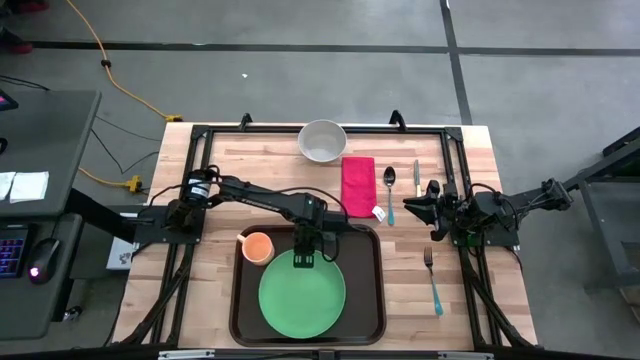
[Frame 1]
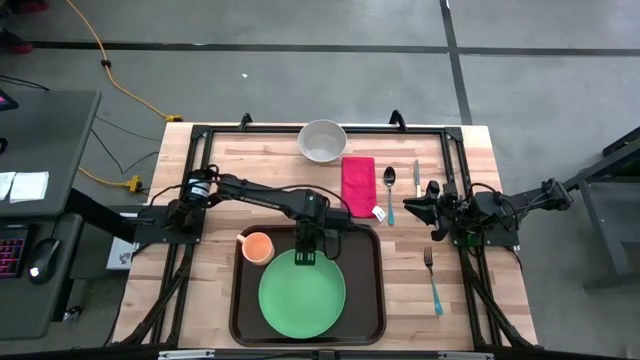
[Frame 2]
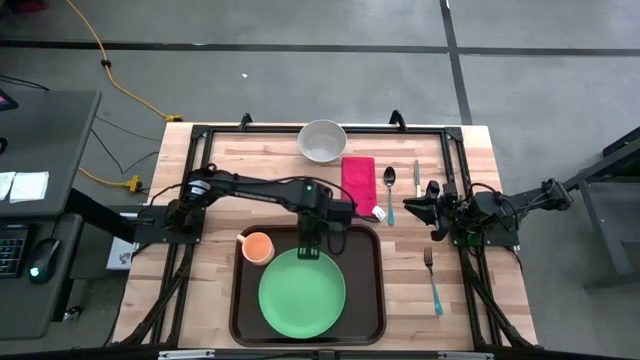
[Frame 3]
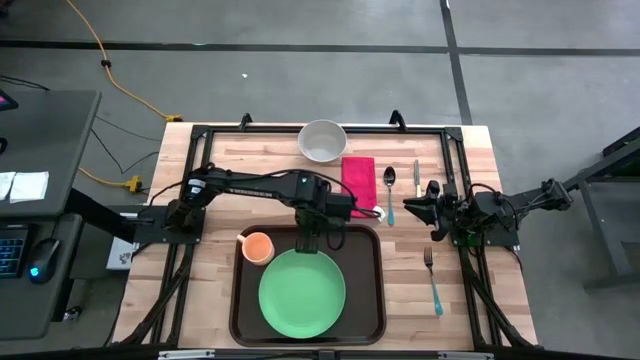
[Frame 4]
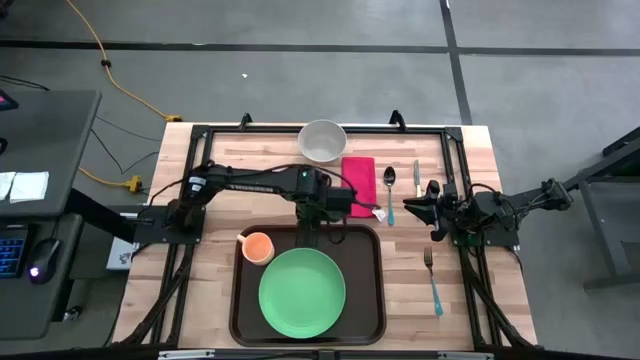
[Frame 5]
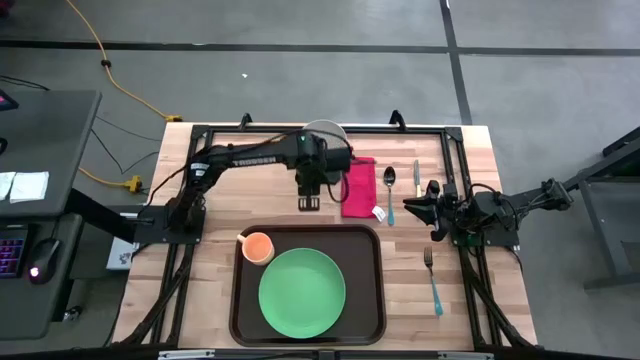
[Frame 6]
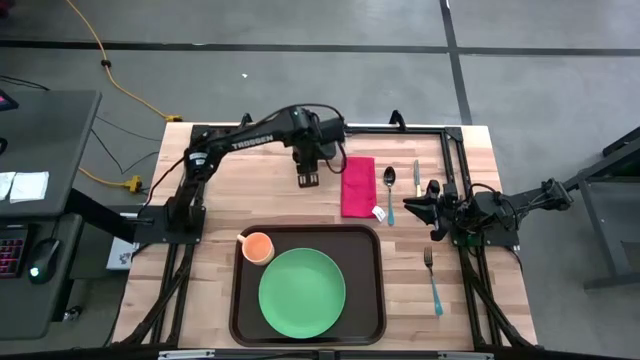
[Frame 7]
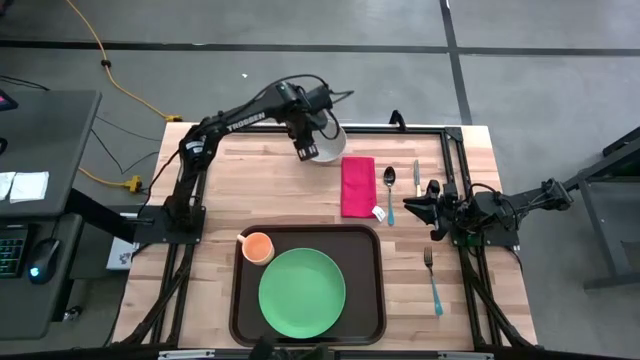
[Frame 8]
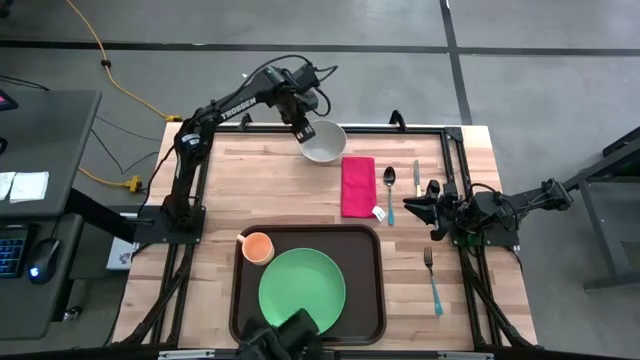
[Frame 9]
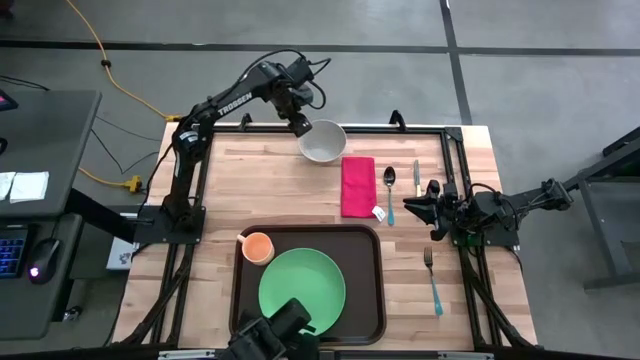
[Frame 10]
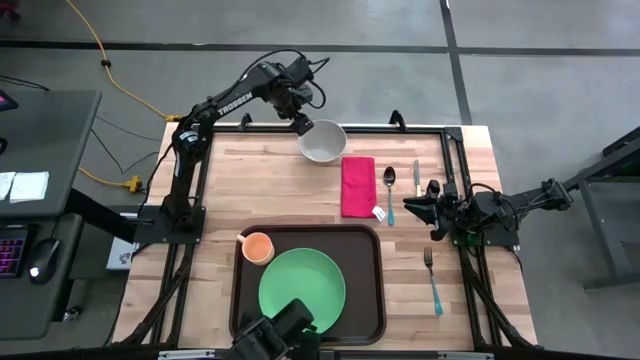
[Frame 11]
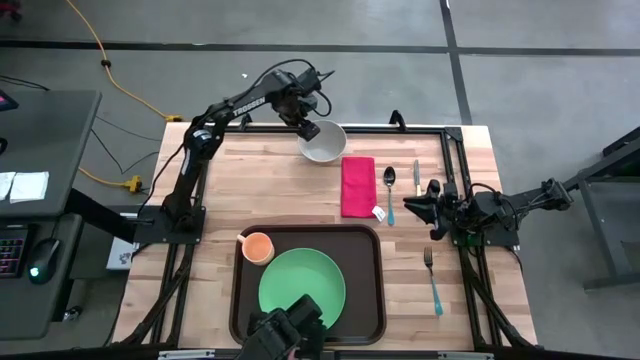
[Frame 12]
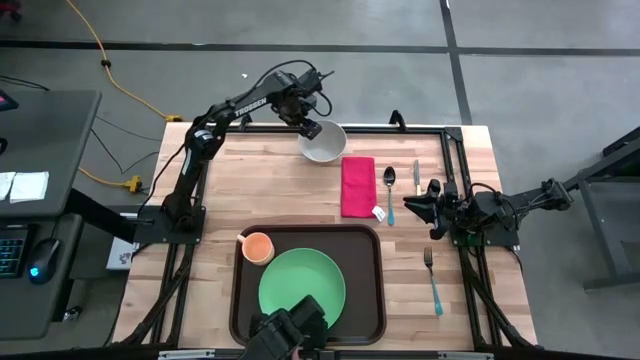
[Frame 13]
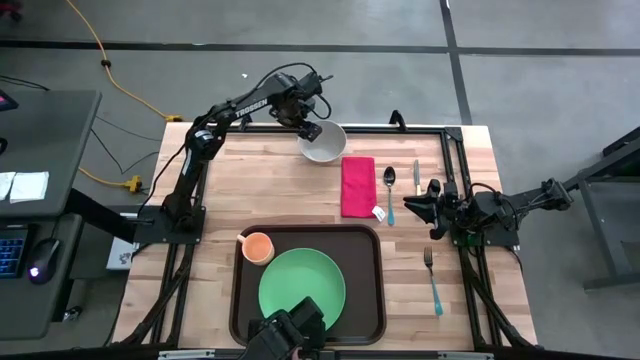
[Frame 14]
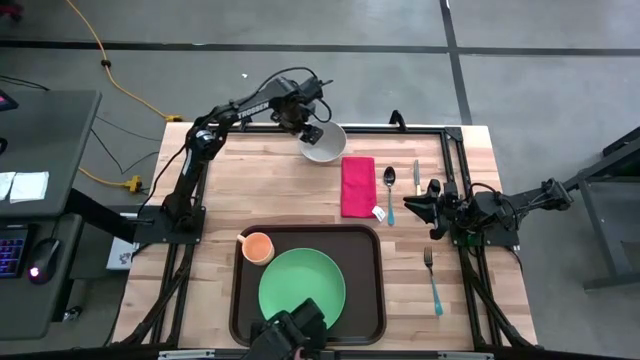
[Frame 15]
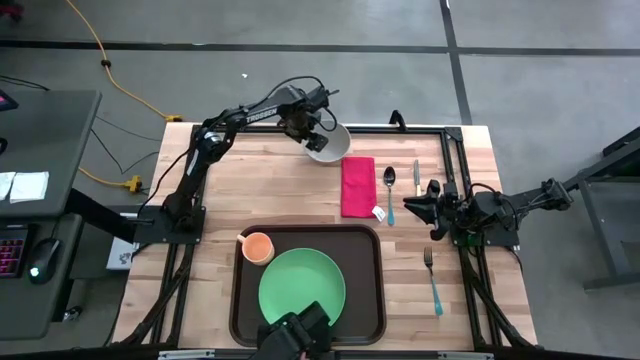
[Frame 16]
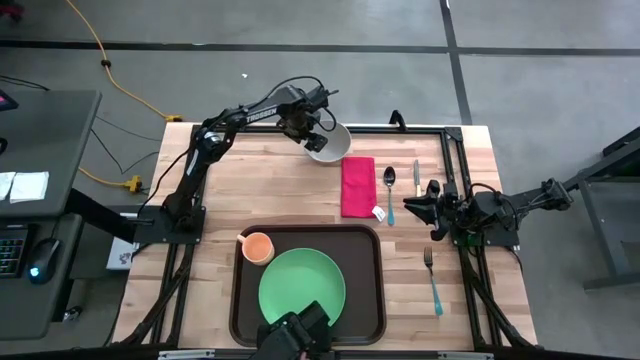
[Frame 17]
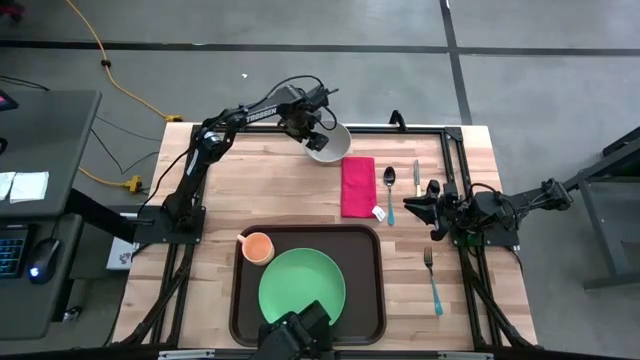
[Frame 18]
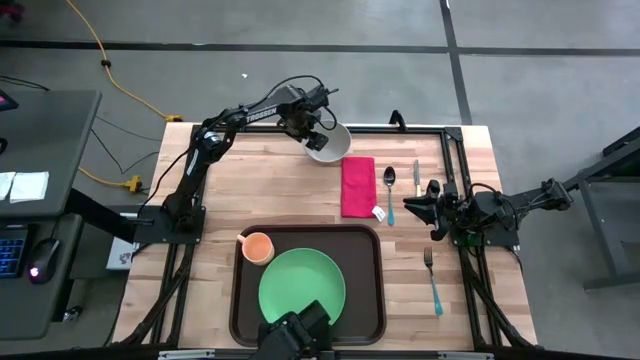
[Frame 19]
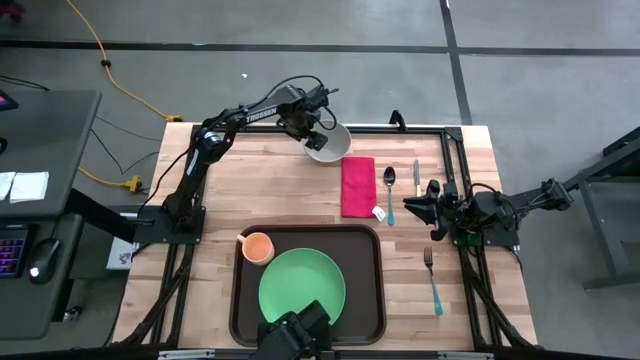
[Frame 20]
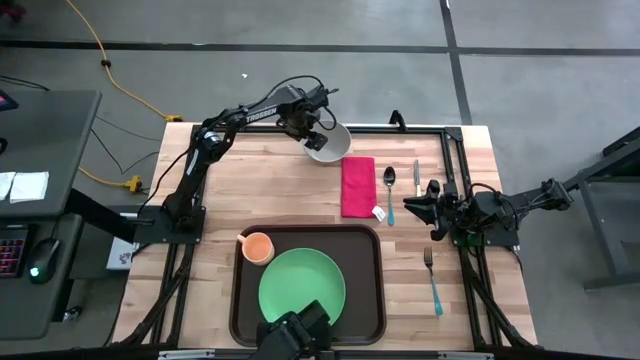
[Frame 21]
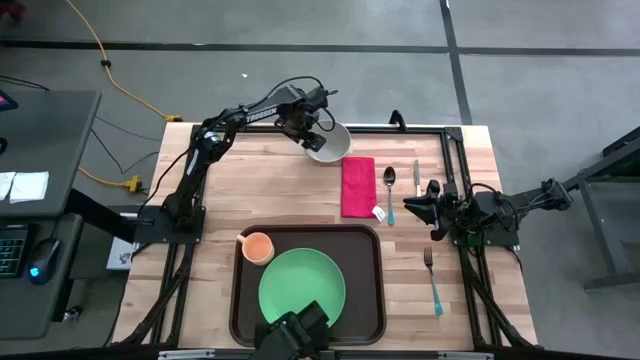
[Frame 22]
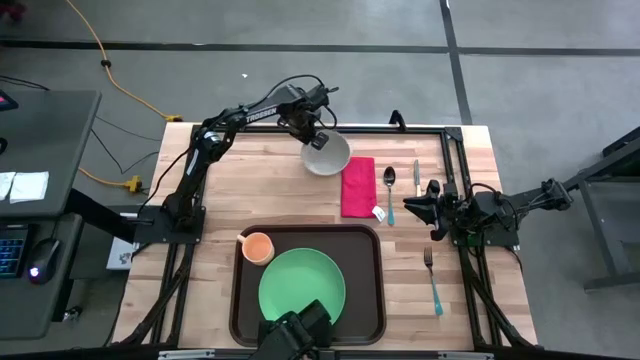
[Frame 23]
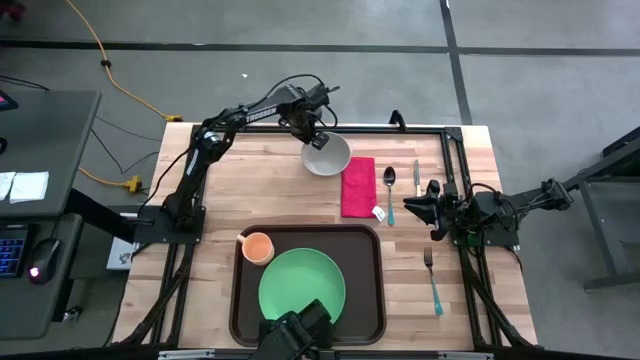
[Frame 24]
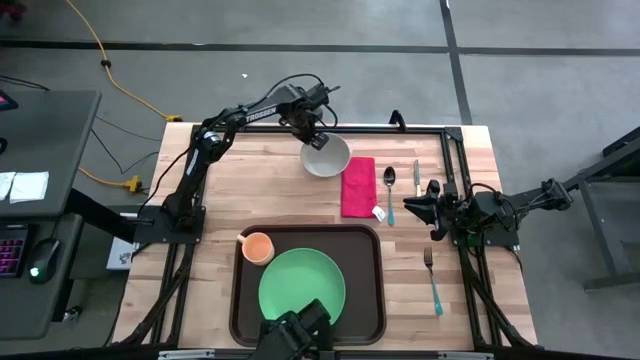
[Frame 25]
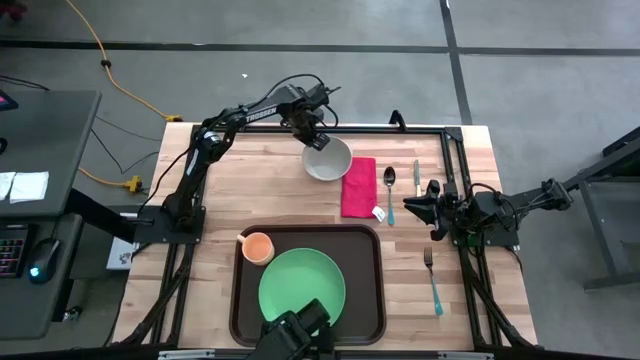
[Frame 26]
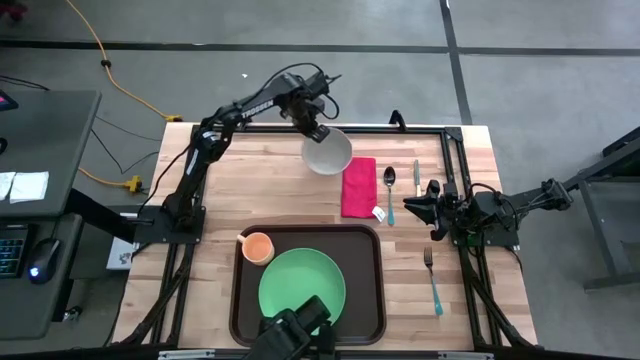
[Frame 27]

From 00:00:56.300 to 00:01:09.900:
Task: Set up tray
Put the gray bowl on the green plate

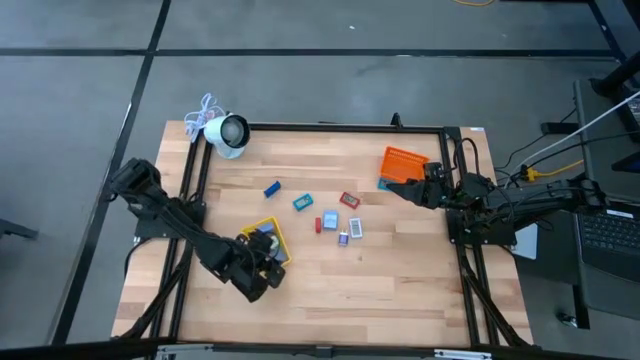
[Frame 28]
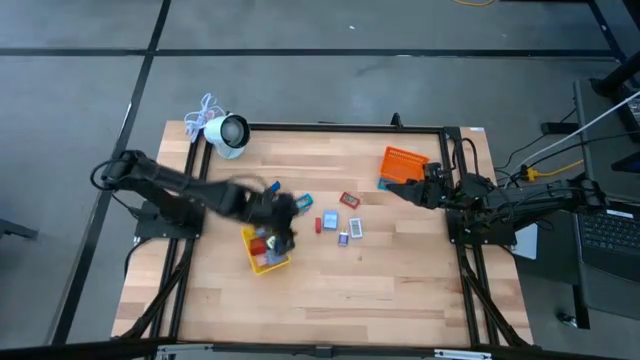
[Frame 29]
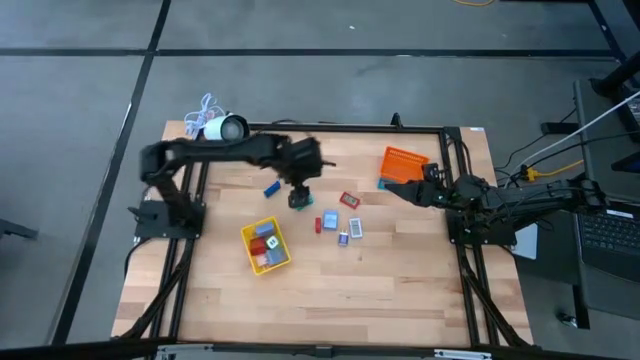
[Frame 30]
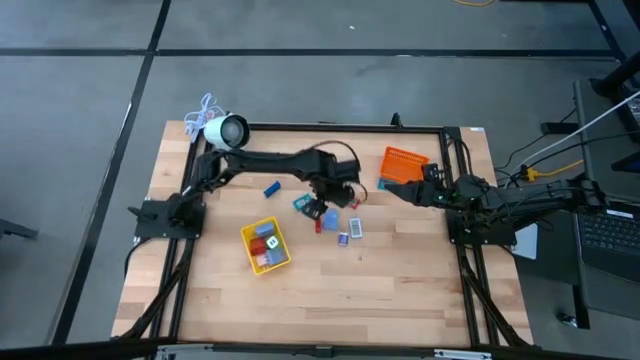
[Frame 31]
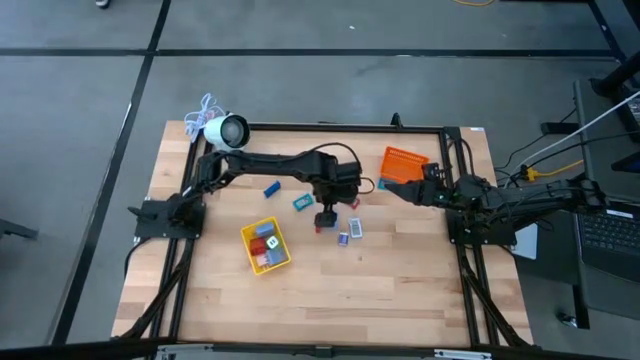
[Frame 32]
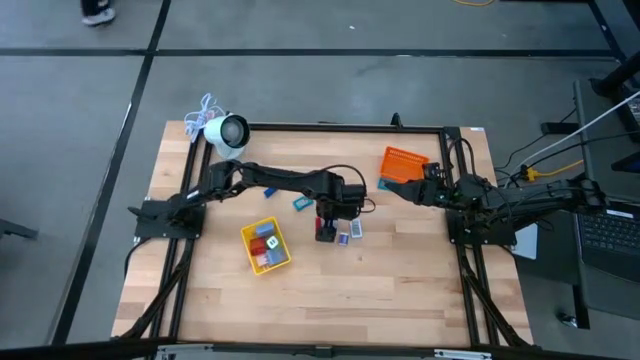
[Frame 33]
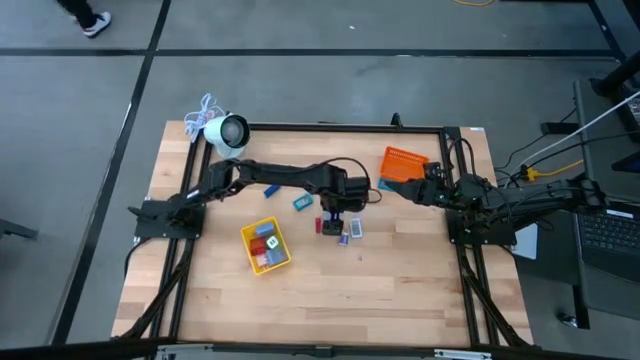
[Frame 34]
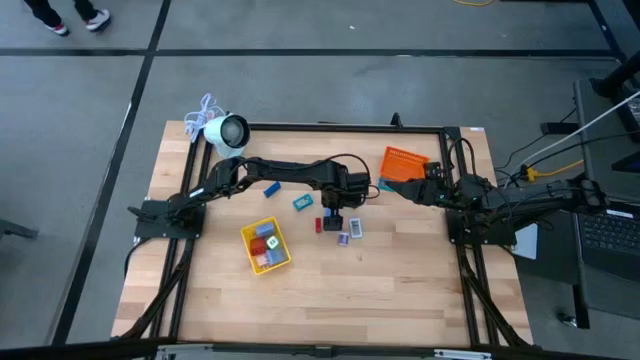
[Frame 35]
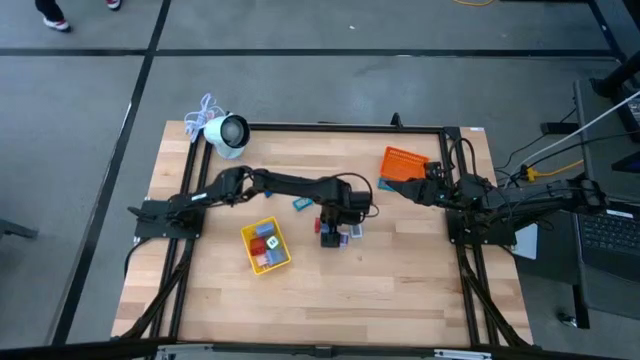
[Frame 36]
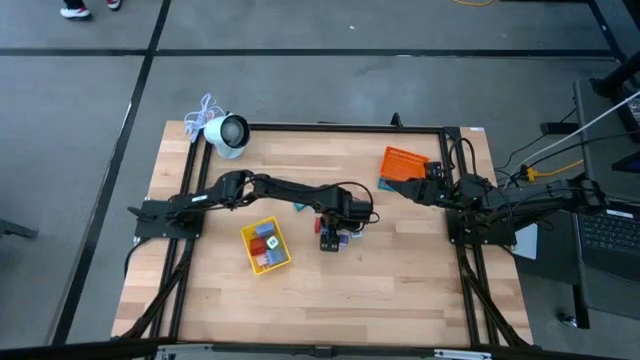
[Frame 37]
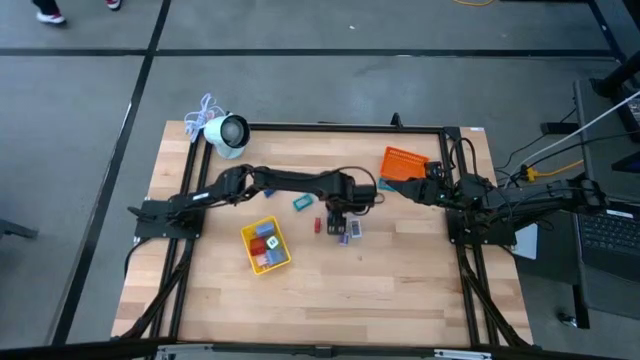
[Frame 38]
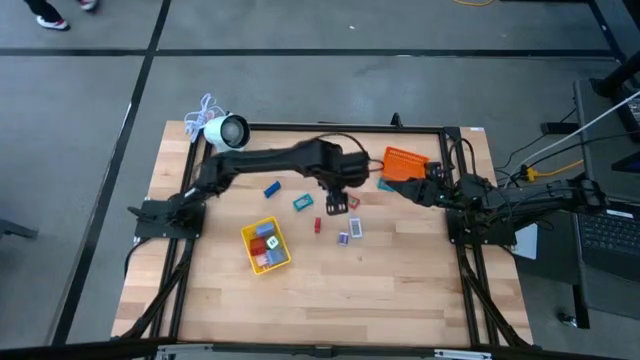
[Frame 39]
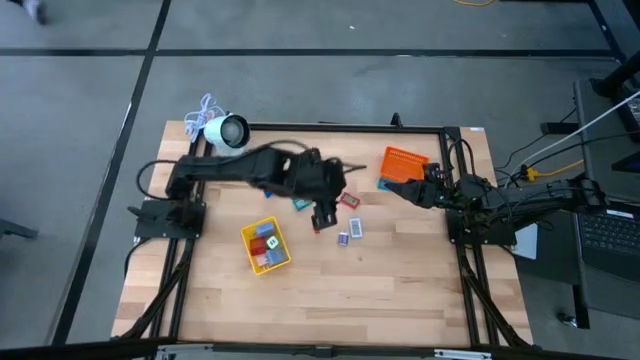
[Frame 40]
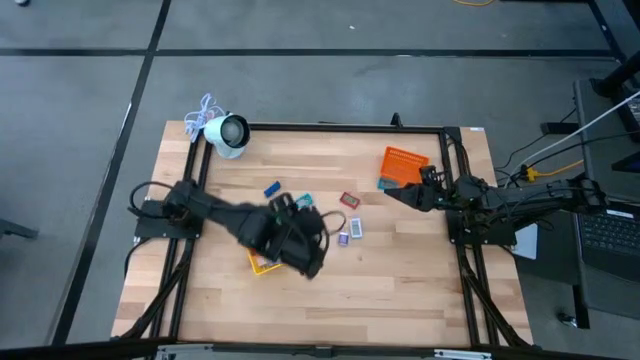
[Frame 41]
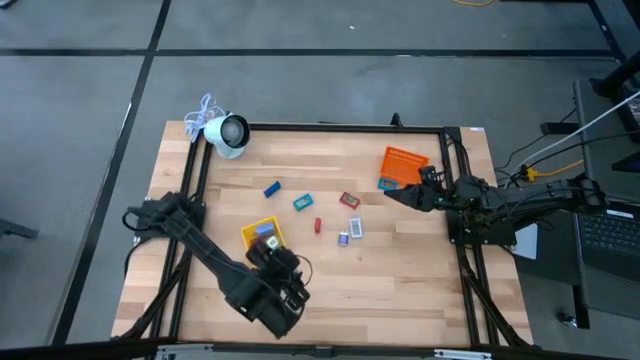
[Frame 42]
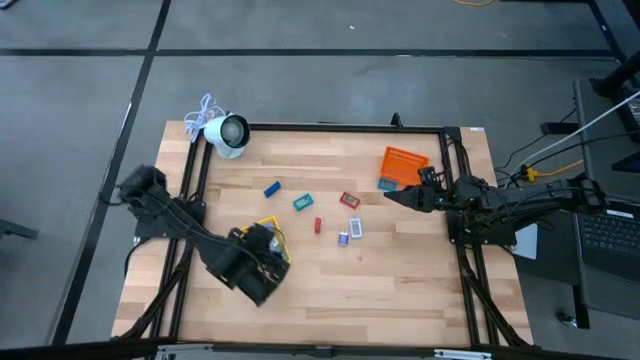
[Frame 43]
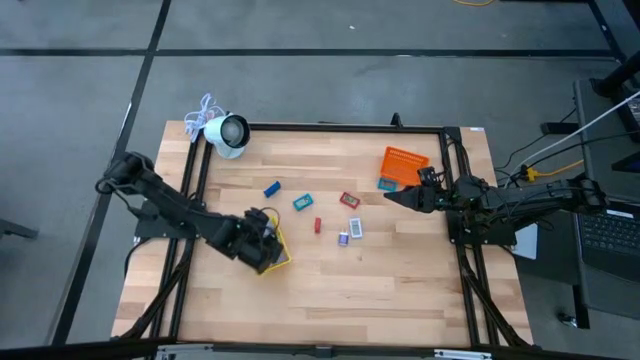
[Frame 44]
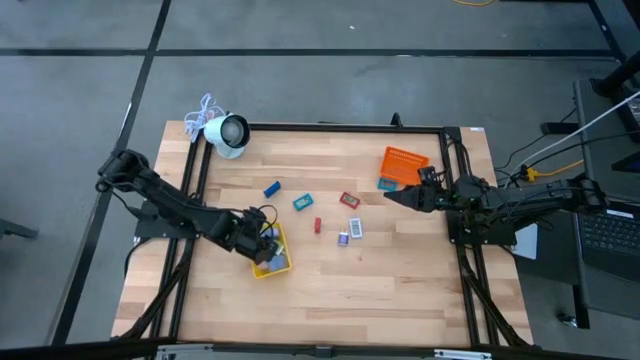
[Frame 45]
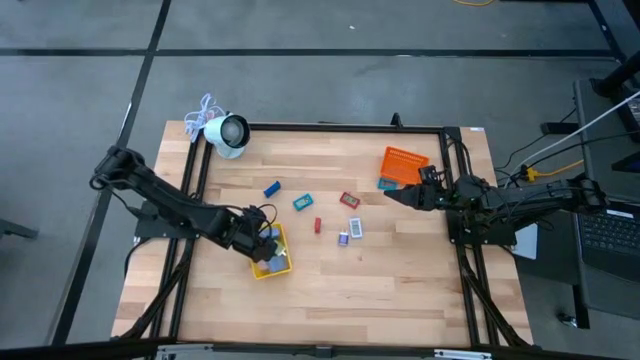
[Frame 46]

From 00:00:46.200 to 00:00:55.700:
Task: Pick & Place Office items
Put the light blue charger adapter into the yellow bin
